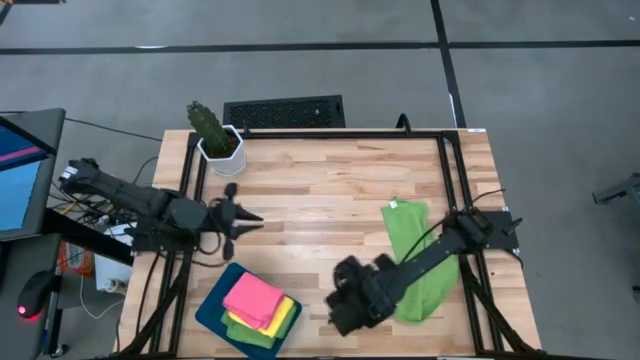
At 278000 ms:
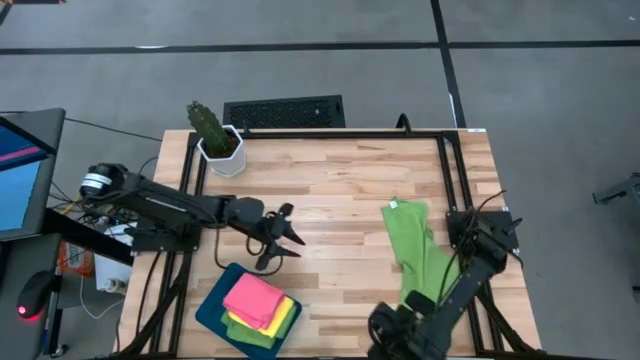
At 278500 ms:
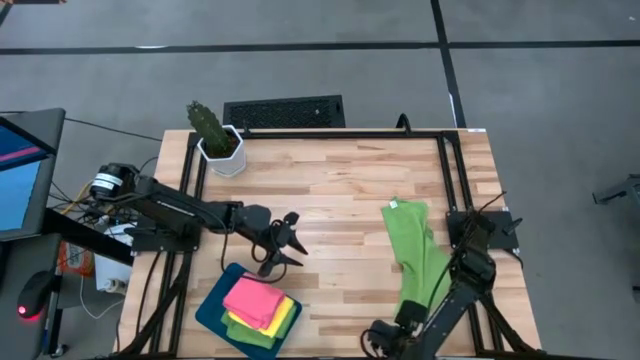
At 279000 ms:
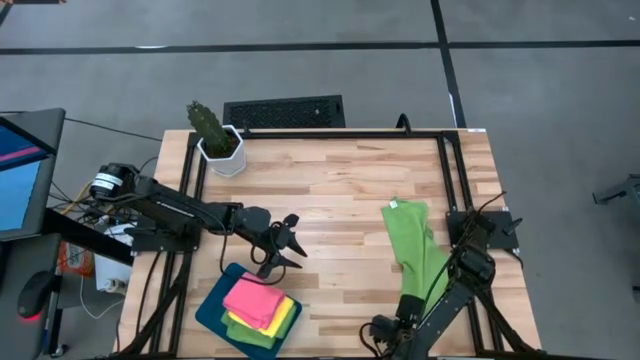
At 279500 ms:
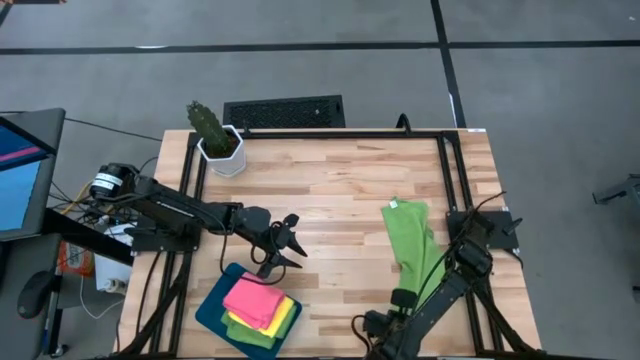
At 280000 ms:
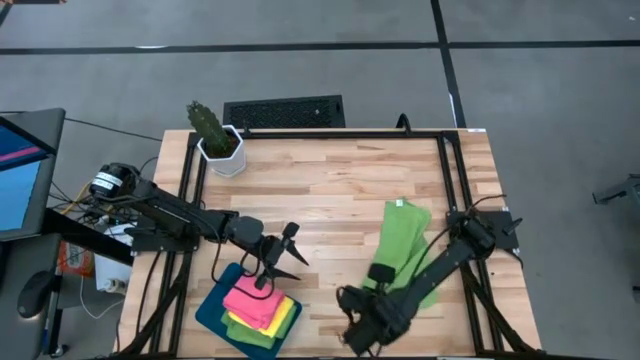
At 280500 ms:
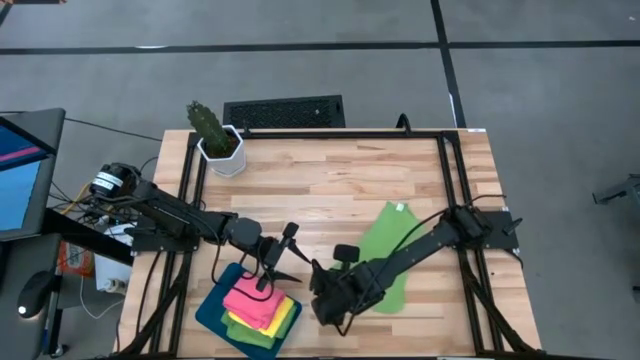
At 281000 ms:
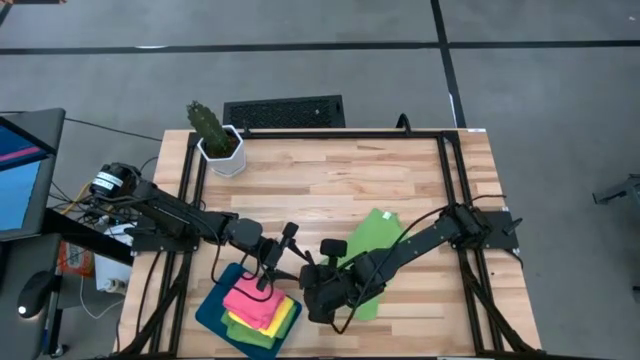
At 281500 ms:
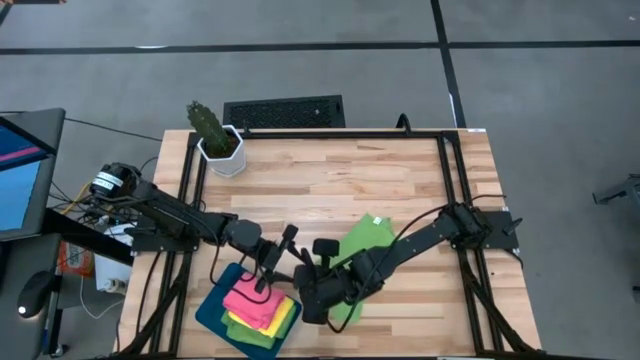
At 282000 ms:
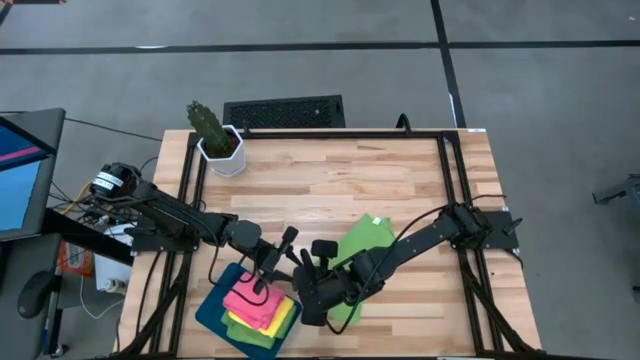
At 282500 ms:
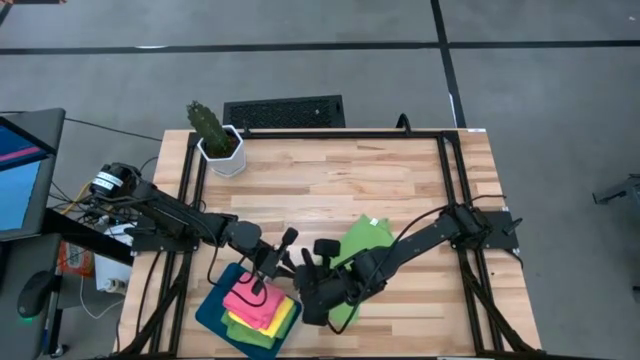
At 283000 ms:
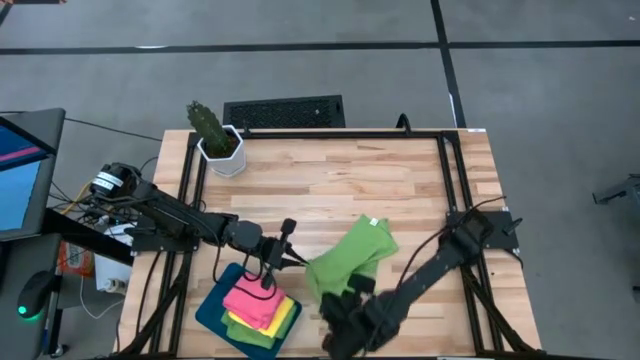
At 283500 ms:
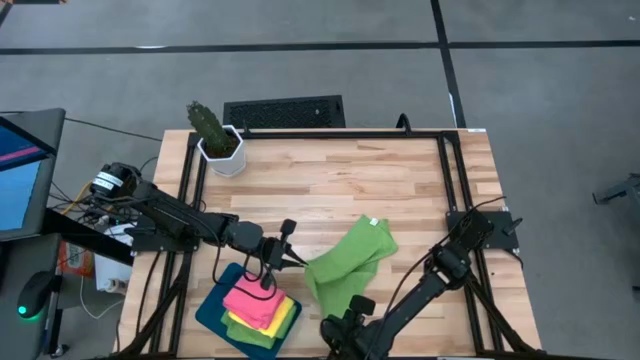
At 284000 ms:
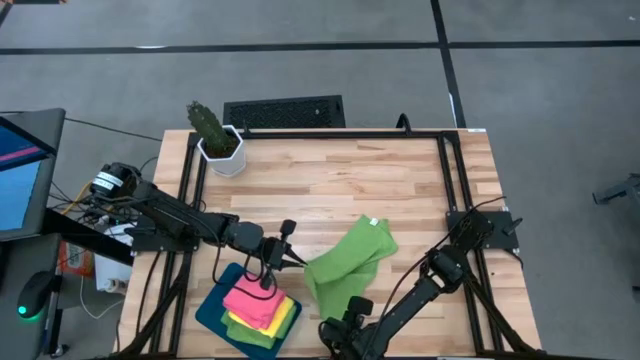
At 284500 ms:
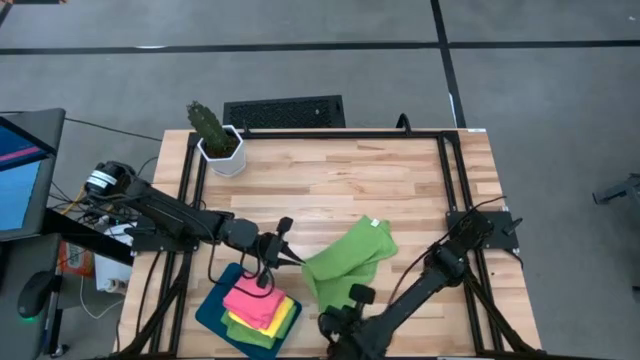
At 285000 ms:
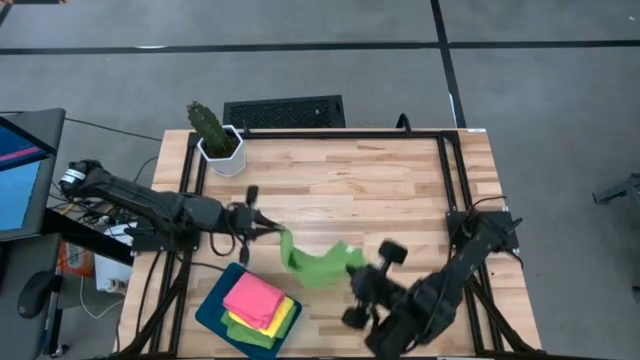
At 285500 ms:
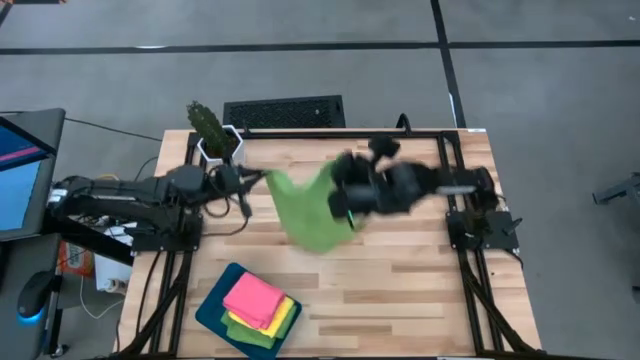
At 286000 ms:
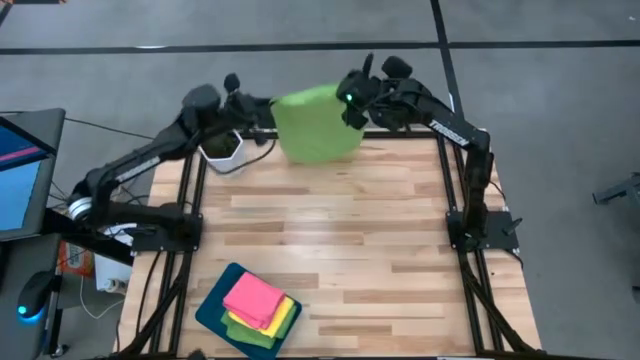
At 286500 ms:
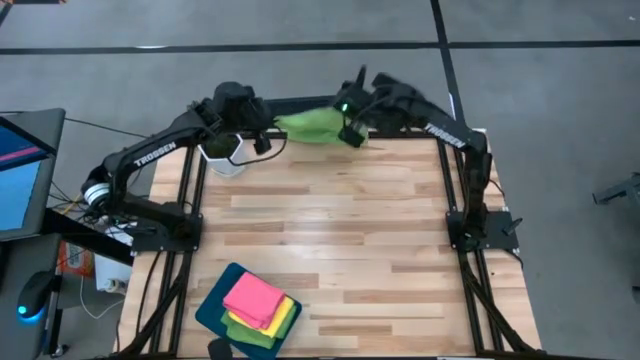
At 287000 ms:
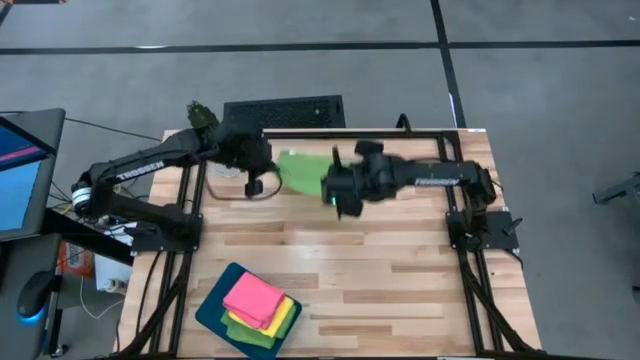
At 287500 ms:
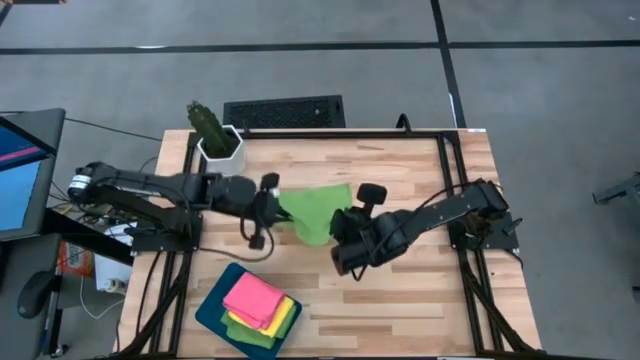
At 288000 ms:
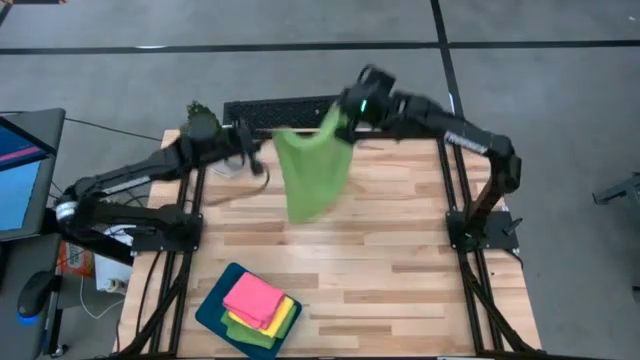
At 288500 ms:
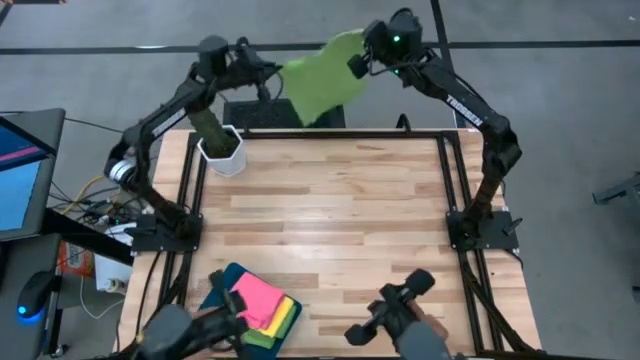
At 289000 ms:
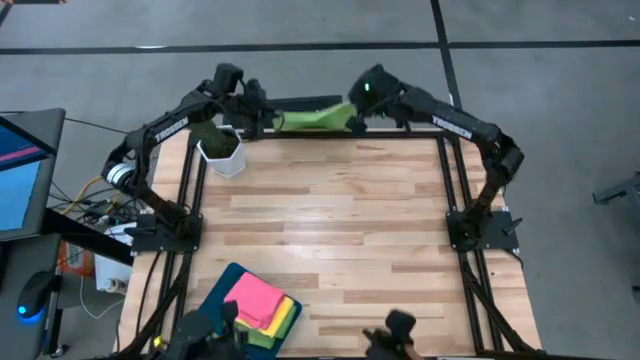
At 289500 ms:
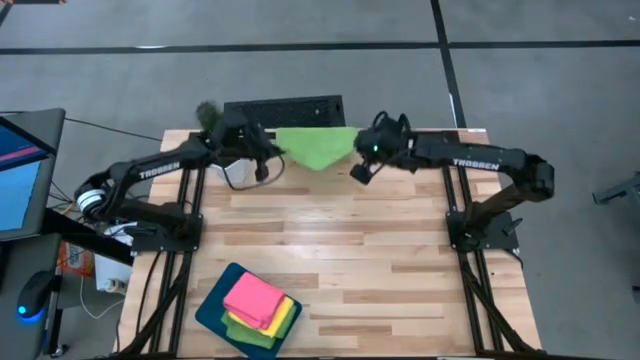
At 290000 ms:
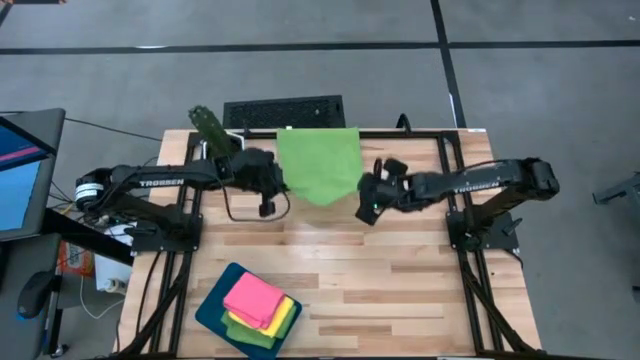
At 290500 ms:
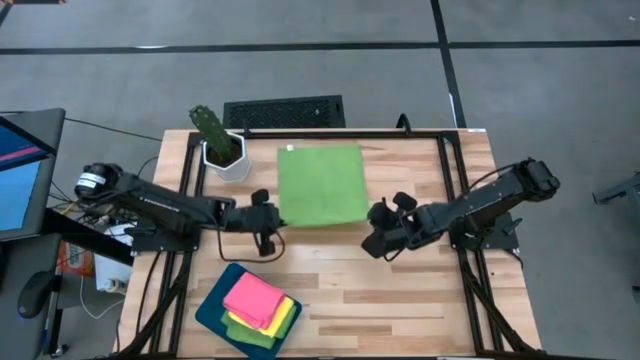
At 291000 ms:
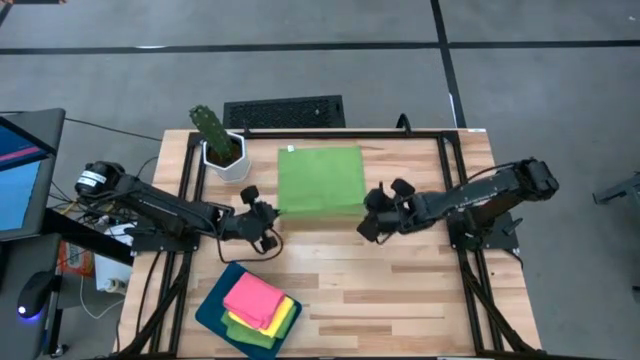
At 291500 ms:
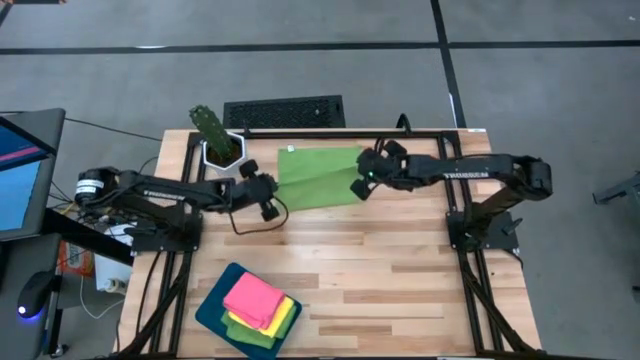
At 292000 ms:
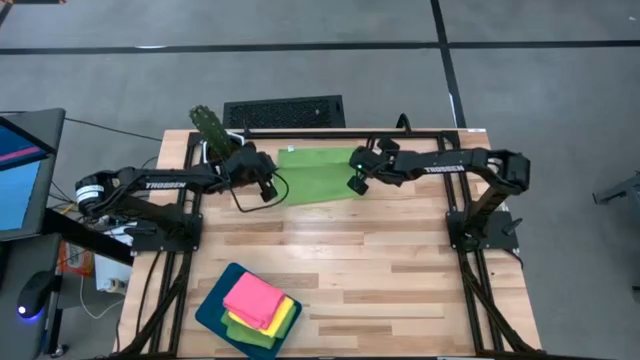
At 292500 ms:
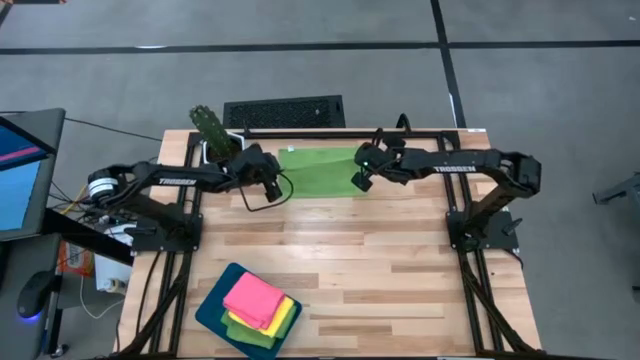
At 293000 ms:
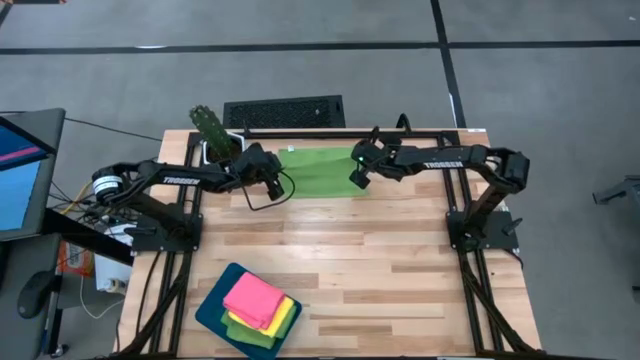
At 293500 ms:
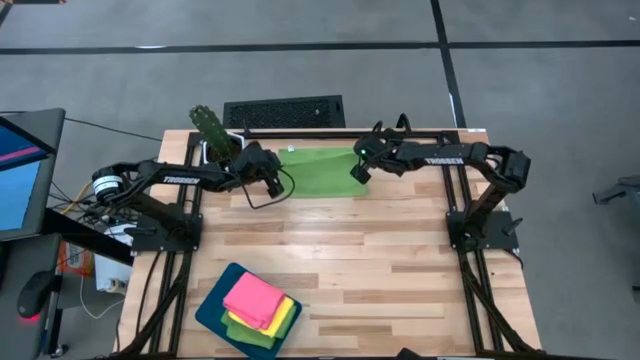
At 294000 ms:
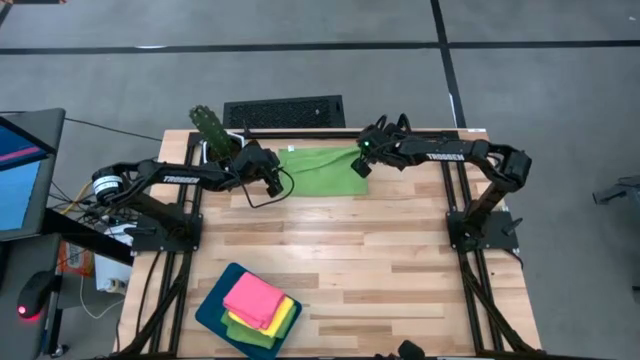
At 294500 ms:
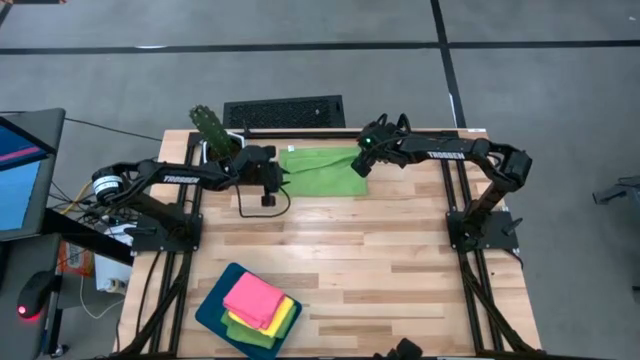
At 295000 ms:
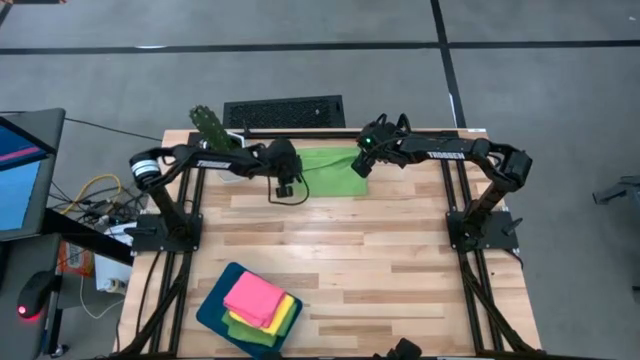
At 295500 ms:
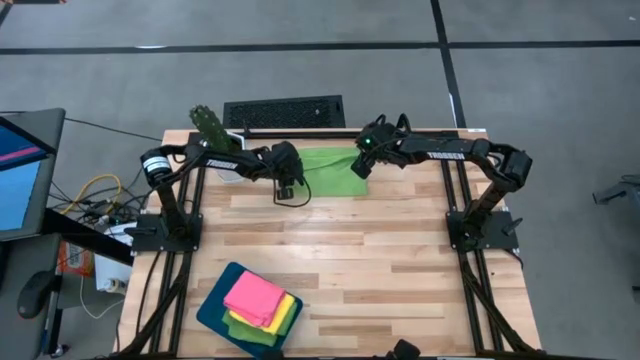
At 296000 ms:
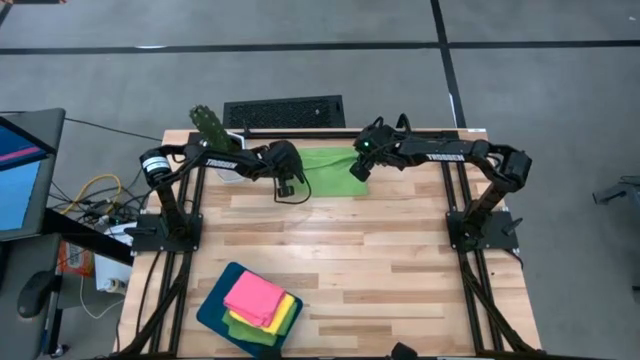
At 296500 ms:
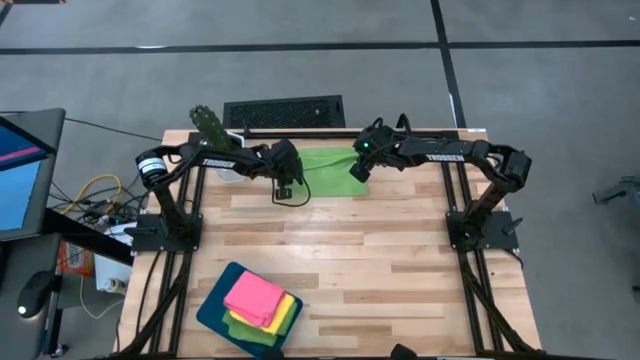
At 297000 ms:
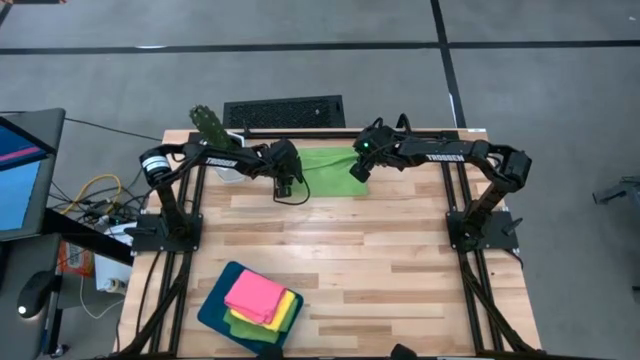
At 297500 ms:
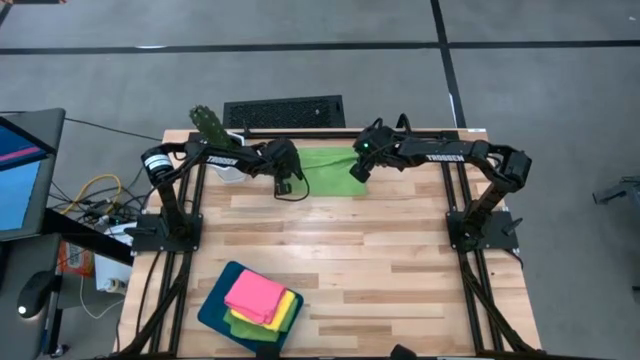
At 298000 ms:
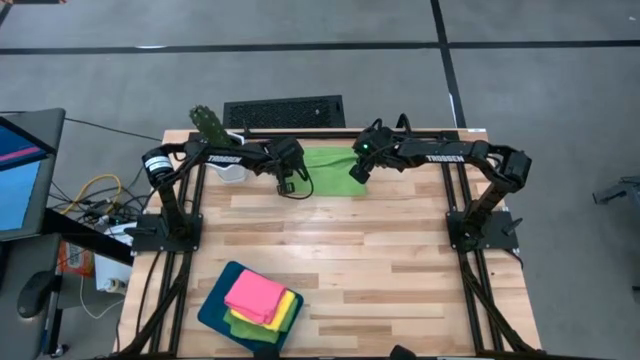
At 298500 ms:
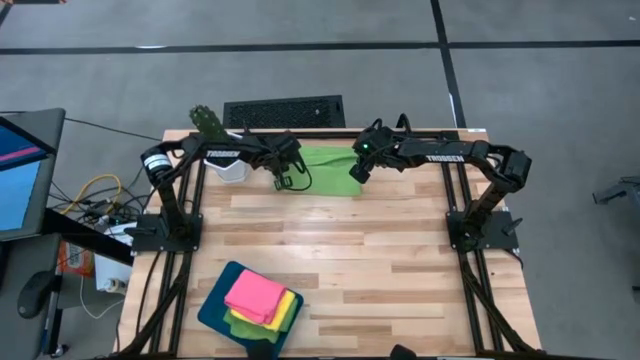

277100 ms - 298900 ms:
Task: Fold microfiber towels
Fold the green microfiber

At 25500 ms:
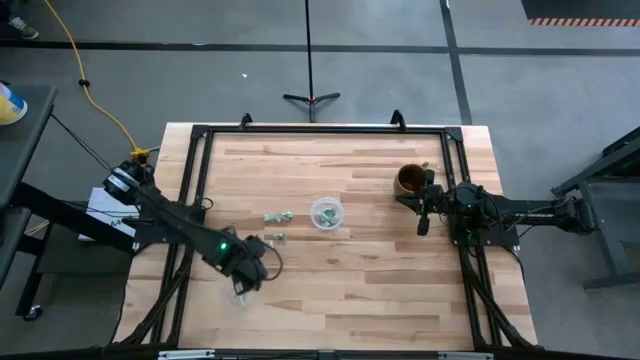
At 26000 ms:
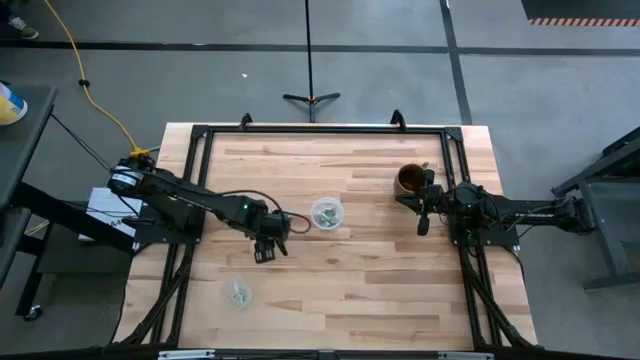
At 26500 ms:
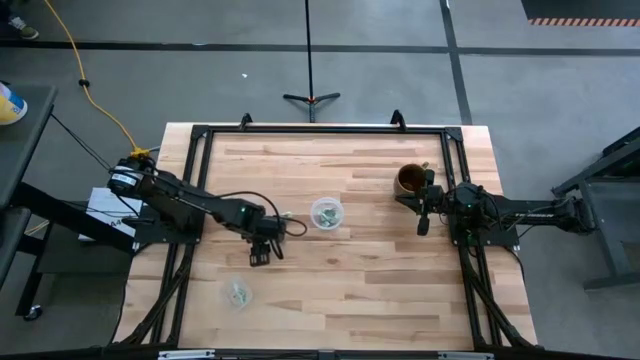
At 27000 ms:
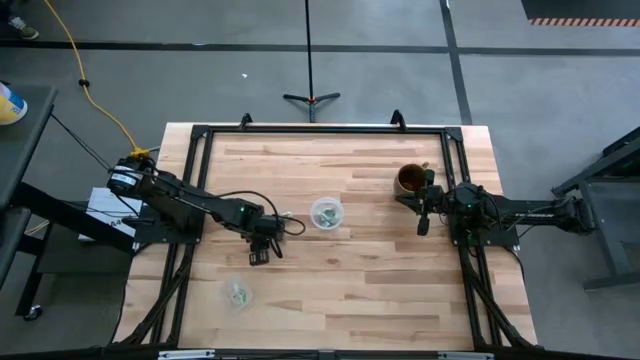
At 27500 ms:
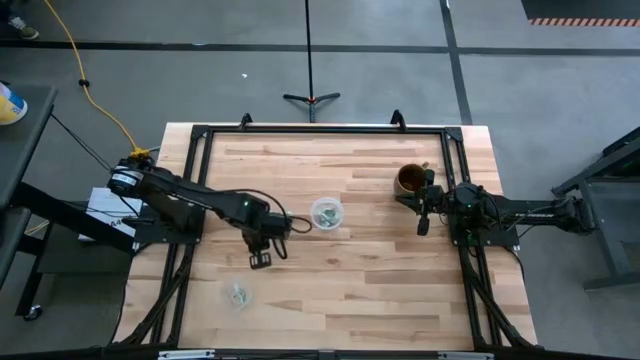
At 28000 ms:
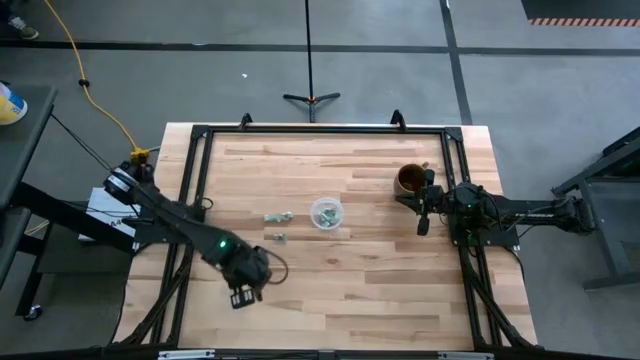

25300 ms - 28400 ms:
Task: Pick and place items into bin
Put the green stevia packet into the bottom transparent bin
